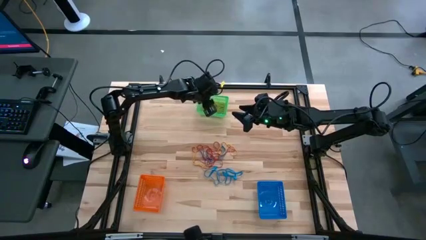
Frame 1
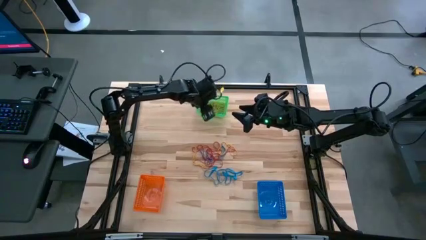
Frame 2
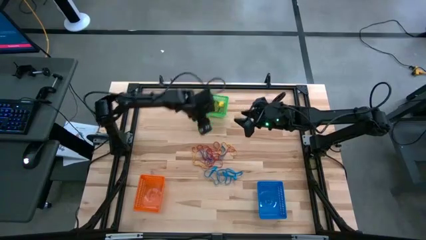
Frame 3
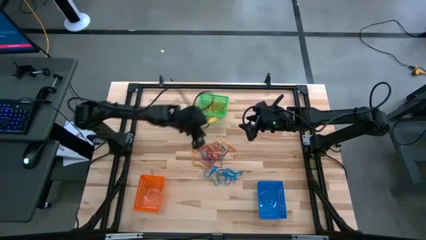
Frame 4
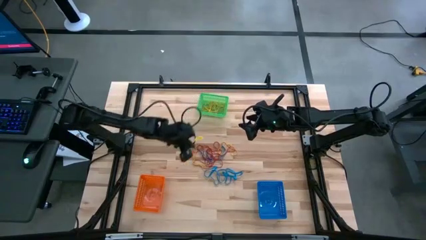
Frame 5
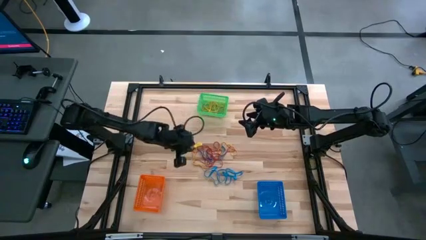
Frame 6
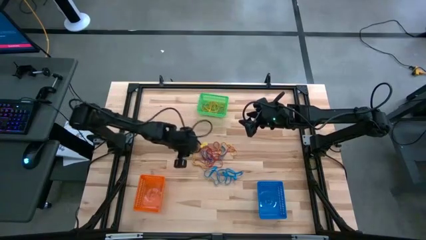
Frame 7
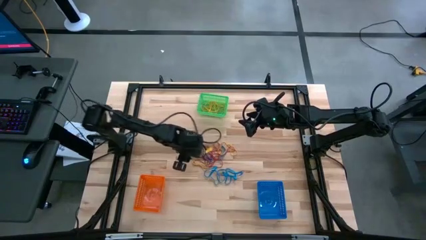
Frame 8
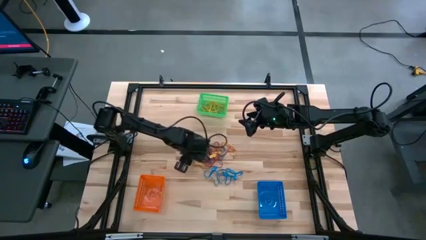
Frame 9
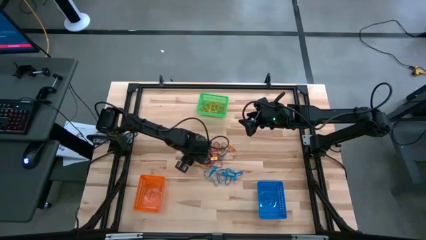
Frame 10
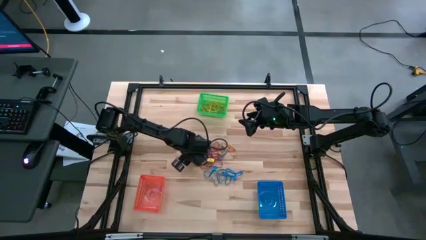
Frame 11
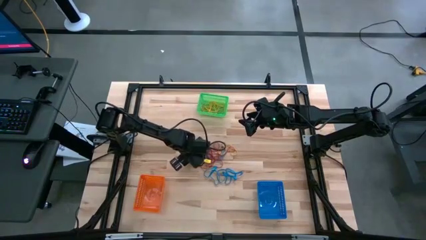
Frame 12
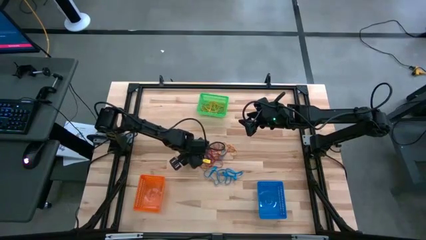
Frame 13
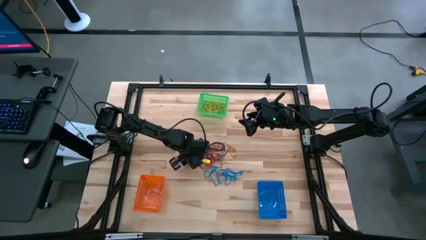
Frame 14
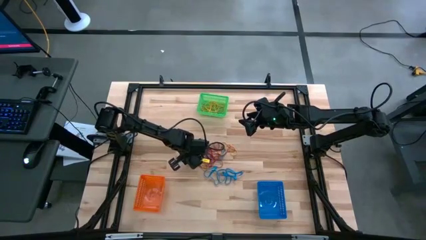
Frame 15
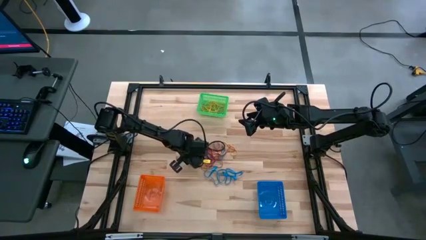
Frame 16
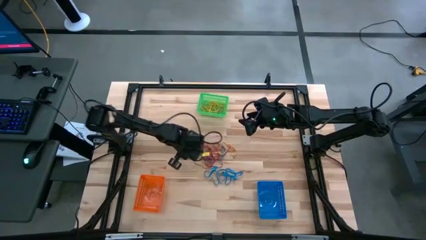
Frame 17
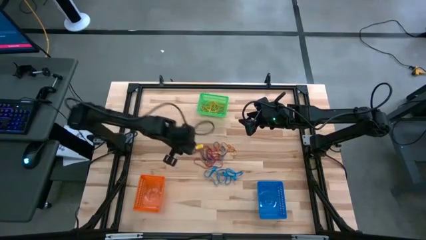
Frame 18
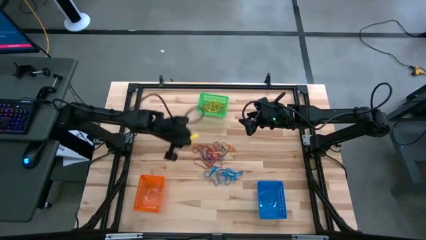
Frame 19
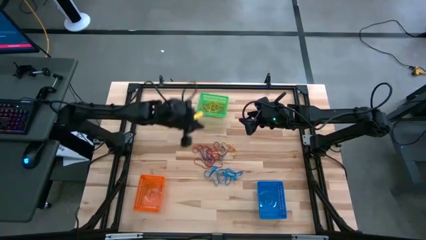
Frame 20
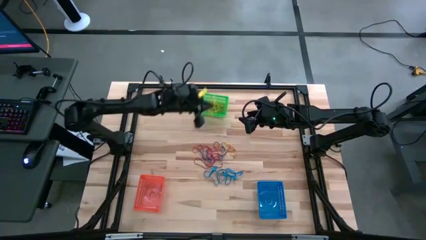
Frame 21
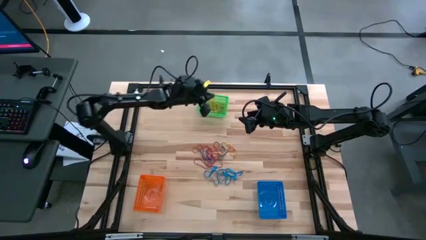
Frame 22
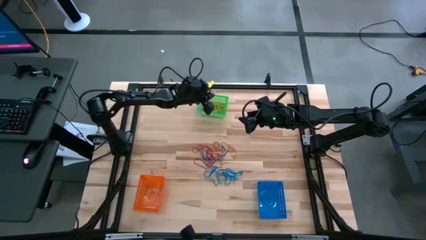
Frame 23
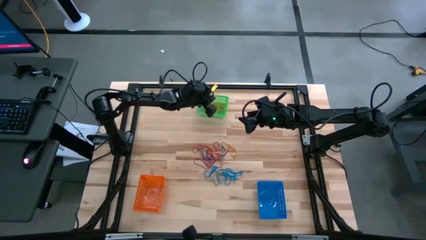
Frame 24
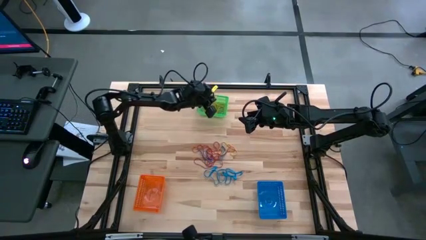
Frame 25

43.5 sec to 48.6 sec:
Task: Sort rubber bands into baskets
Put the yellow rubber band into the green bin

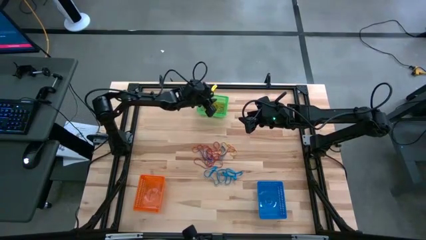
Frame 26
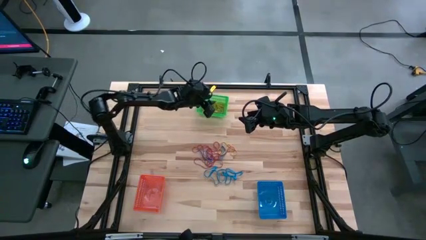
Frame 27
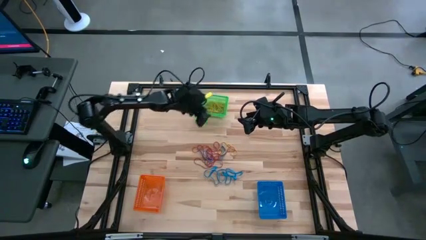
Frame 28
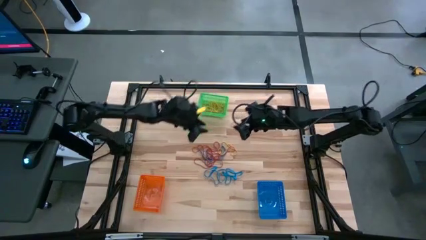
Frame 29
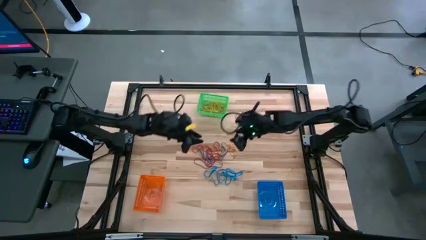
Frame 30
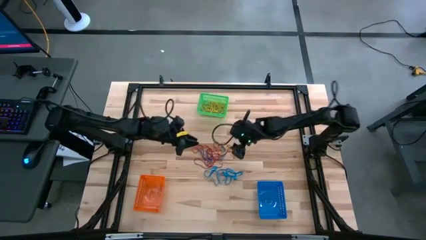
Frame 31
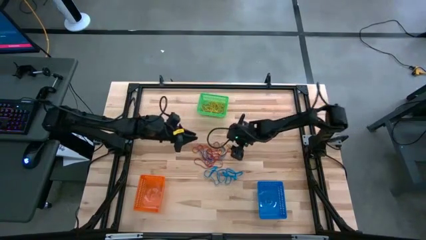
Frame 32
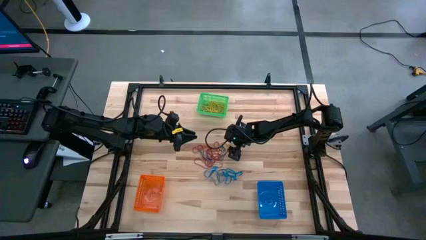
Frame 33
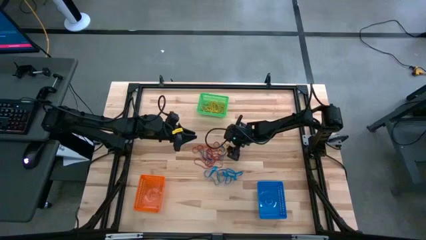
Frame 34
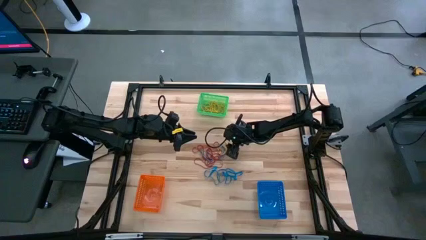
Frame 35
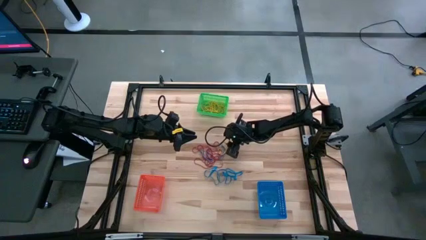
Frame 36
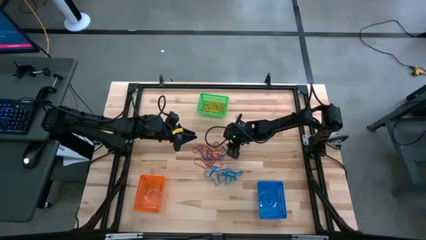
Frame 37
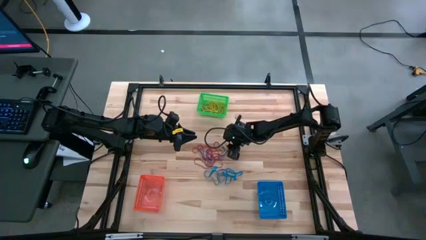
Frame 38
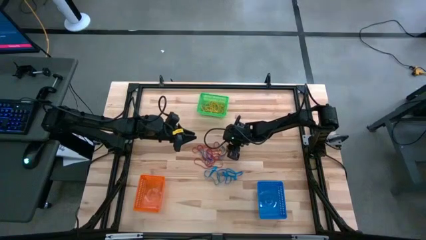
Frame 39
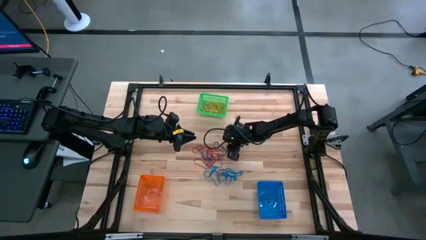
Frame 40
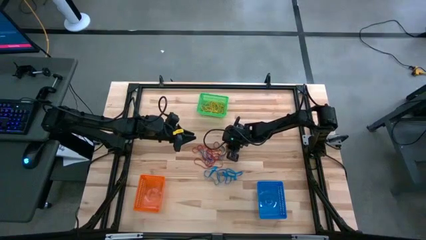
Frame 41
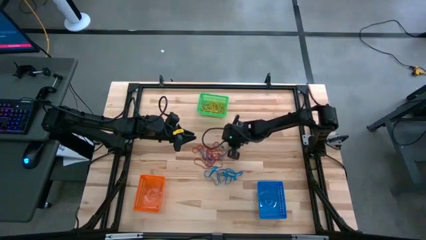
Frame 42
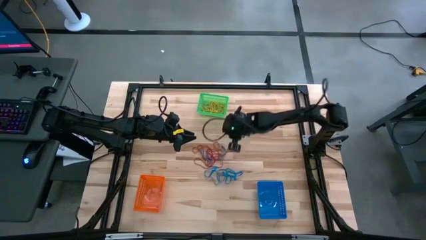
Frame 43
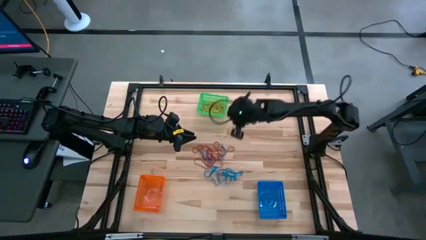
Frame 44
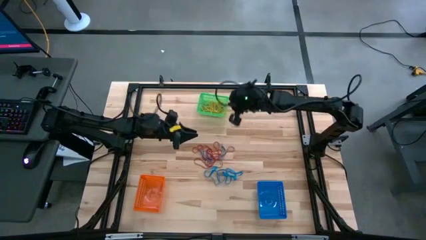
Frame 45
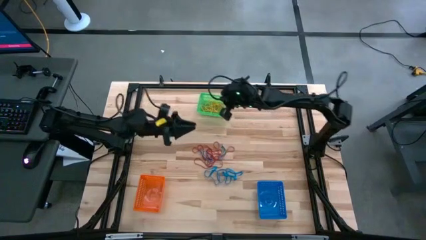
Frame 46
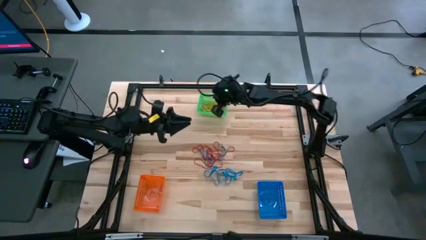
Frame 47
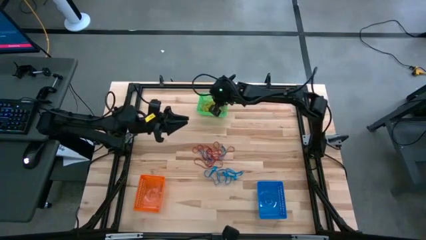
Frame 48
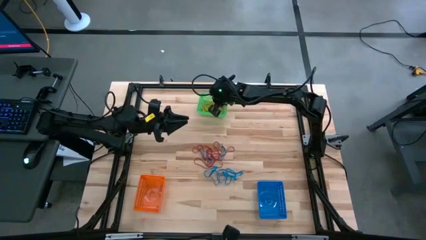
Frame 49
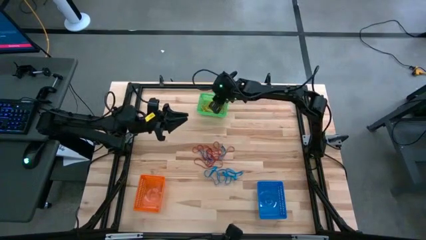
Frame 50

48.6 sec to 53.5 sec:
Put the yellow rubber band into the green bin

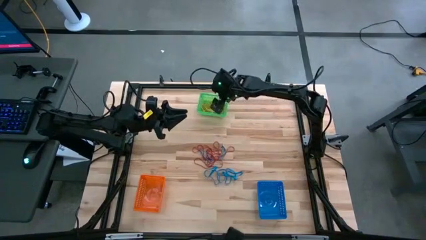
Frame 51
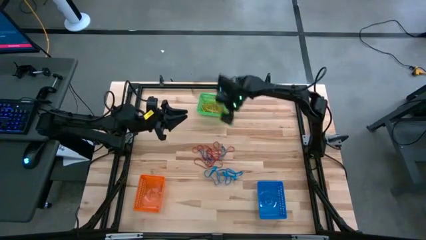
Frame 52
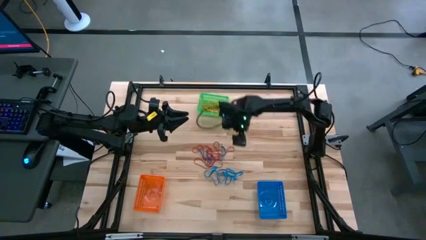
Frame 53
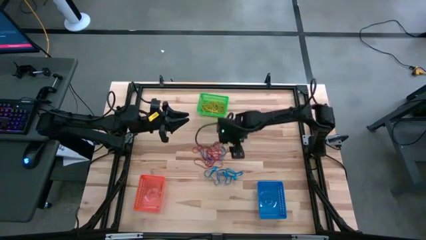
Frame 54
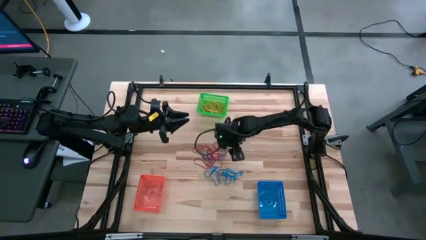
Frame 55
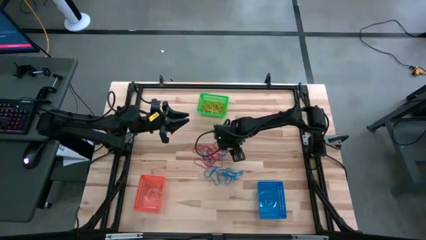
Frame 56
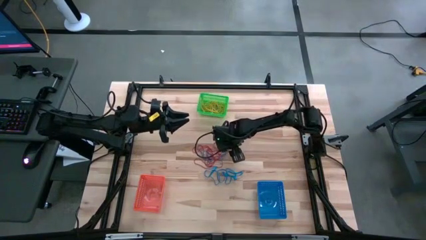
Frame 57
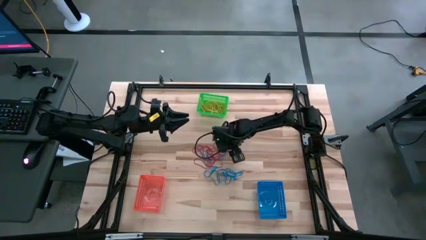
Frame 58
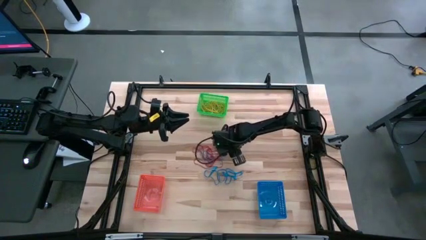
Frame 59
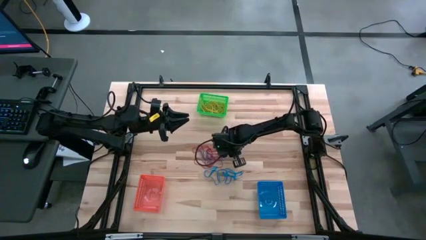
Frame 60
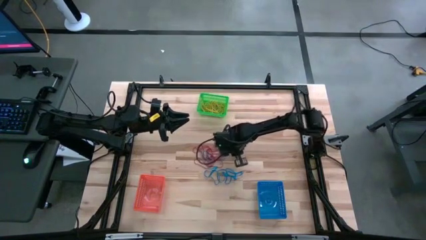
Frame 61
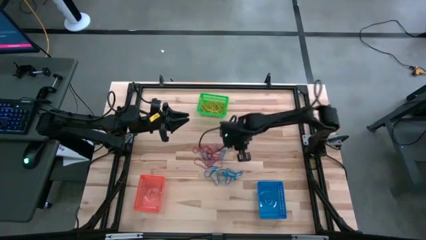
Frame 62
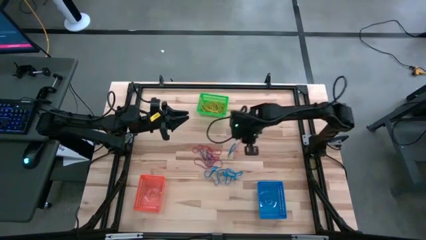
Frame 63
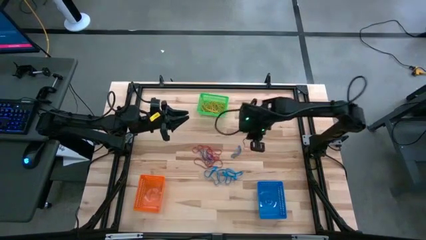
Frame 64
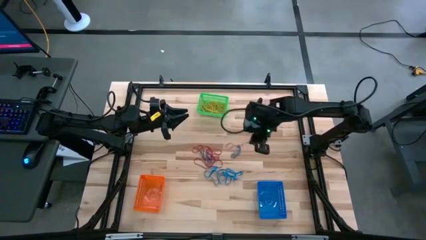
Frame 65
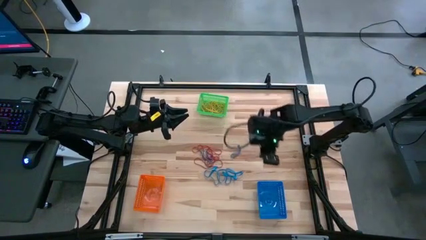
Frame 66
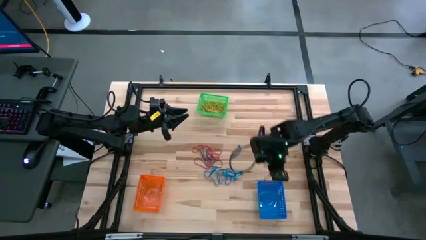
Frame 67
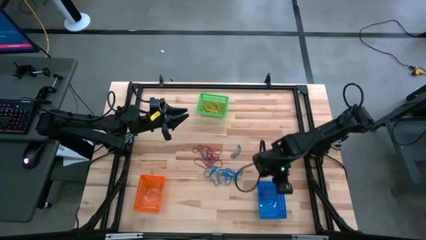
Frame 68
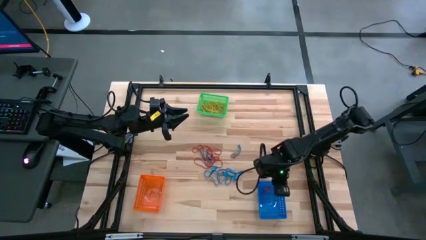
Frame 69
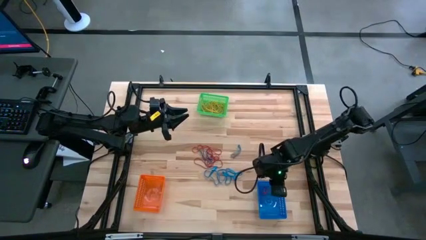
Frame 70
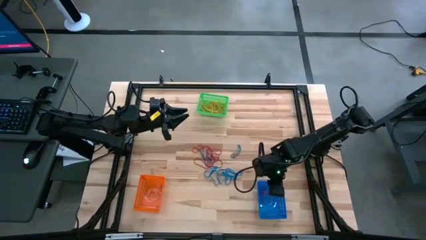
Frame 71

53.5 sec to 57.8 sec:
Put the red rubber band into the blue bin

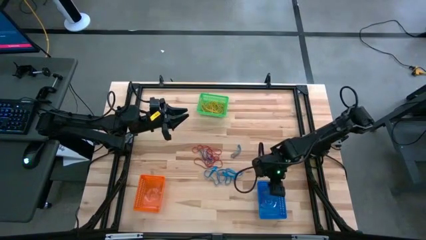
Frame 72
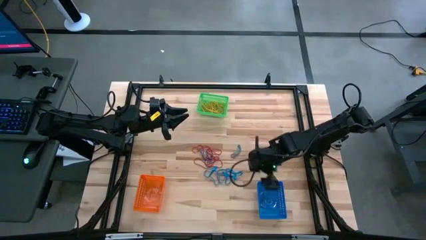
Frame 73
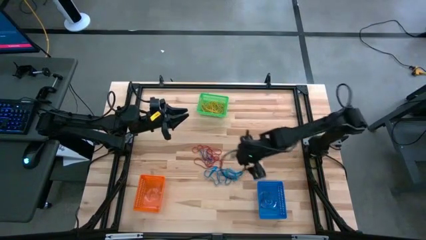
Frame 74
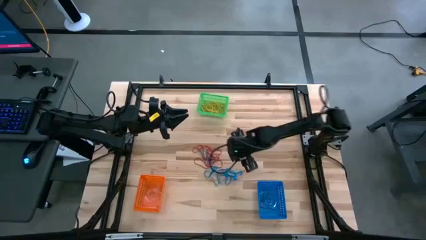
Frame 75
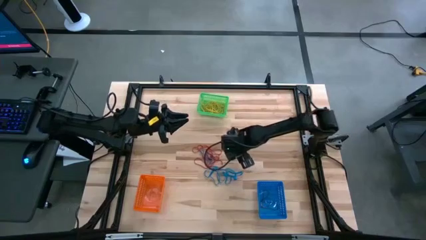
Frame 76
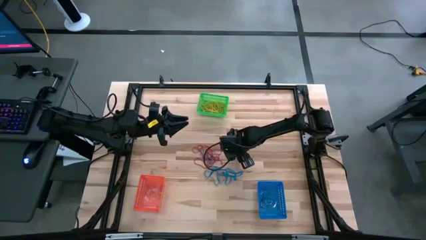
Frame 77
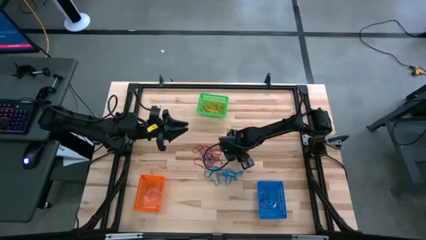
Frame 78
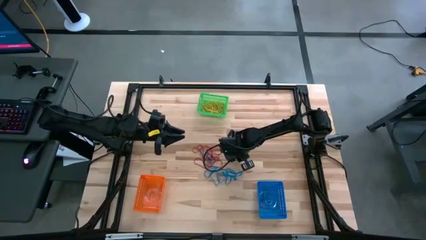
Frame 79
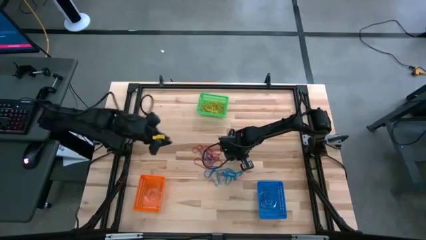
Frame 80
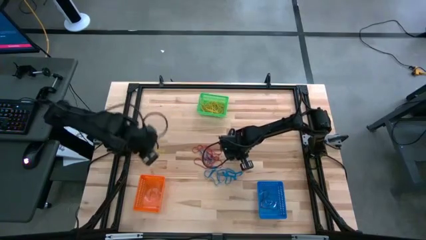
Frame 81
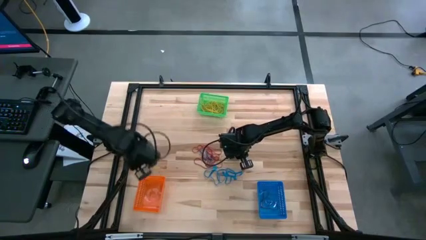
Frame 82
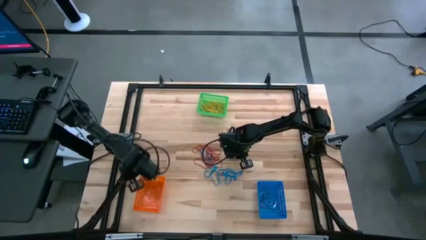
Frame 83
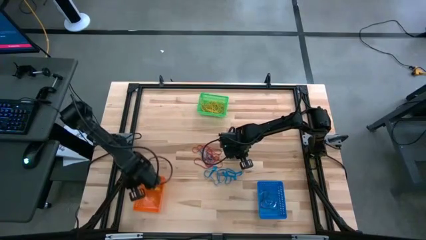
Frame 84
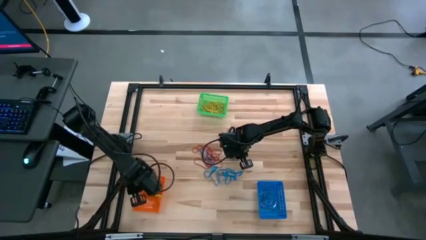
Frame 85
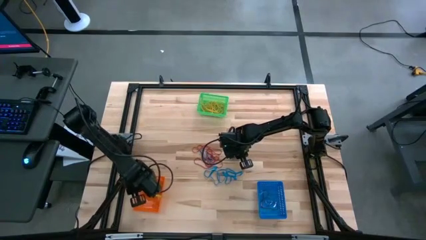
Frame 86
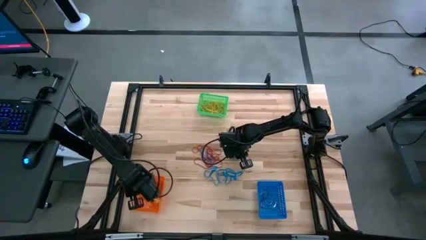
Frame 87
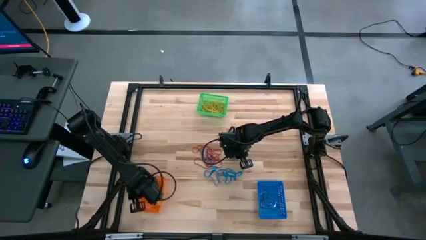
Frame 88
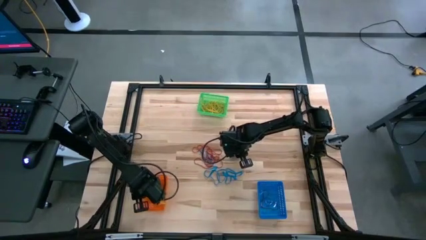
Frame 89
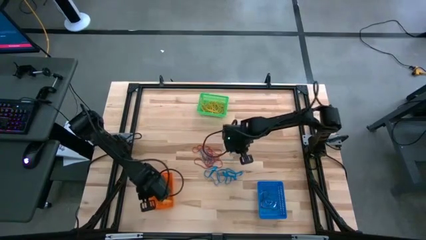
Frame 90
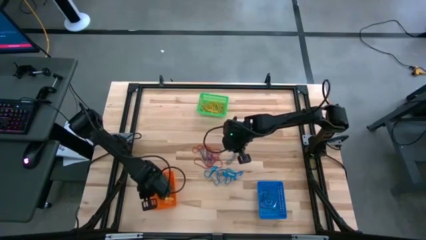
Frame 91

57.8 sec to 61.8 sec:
Put the blue rubber band into the orange bin
